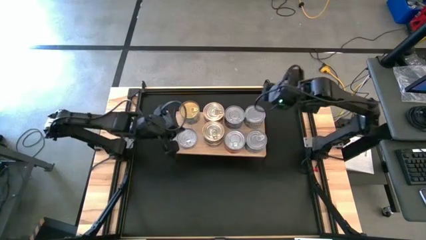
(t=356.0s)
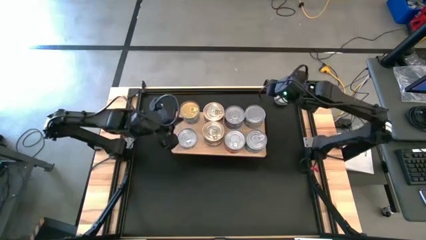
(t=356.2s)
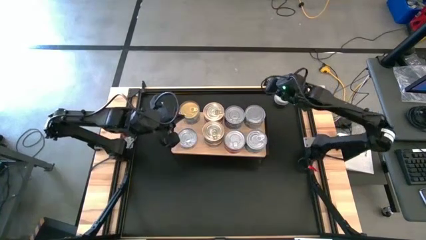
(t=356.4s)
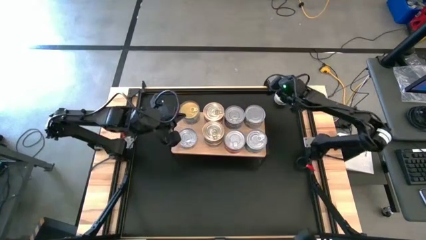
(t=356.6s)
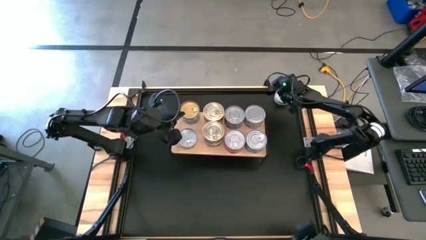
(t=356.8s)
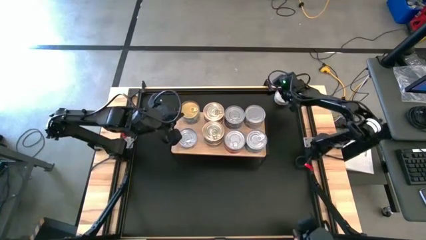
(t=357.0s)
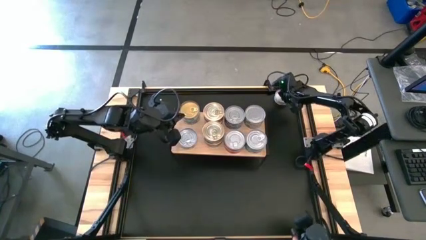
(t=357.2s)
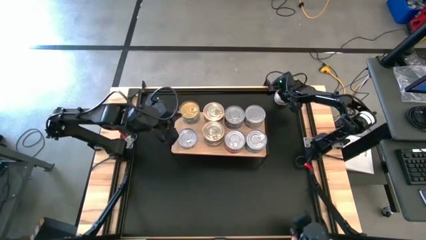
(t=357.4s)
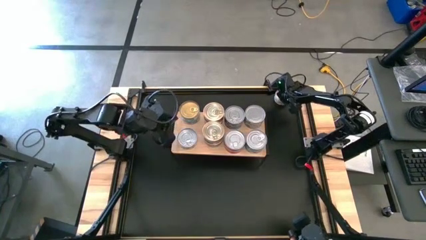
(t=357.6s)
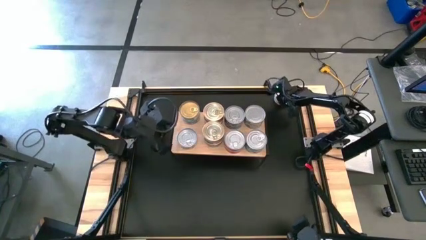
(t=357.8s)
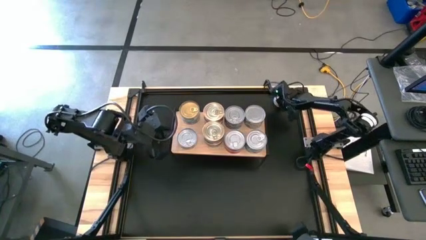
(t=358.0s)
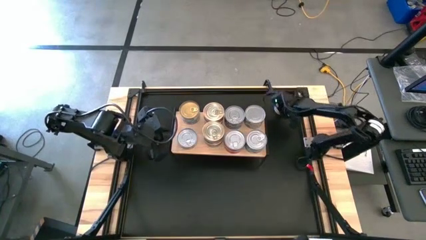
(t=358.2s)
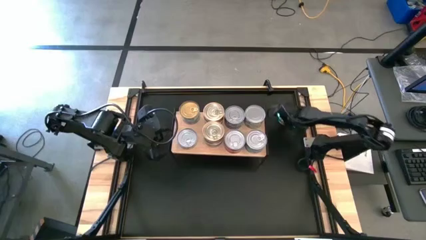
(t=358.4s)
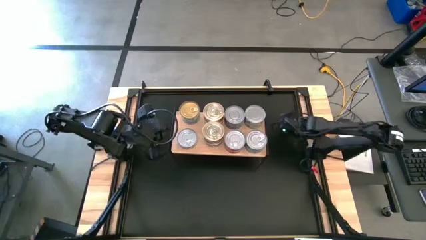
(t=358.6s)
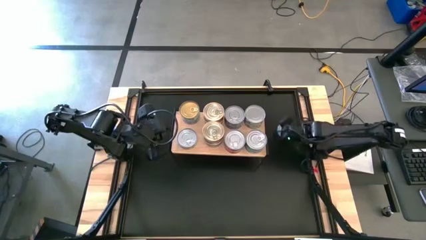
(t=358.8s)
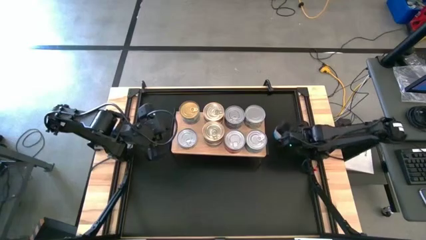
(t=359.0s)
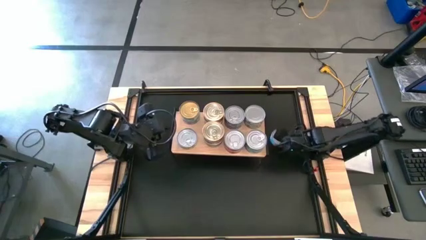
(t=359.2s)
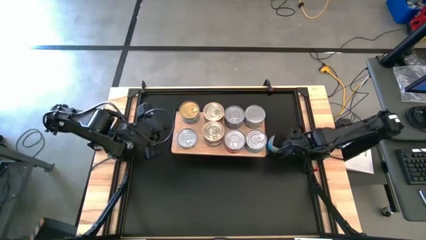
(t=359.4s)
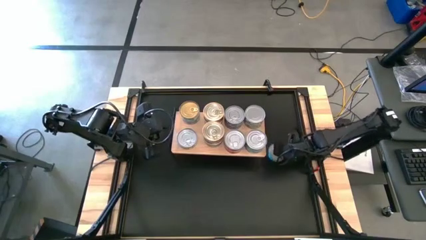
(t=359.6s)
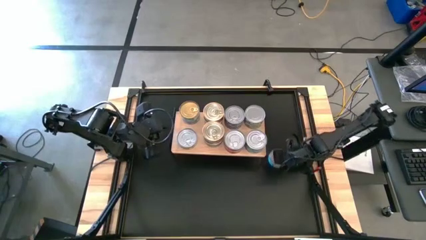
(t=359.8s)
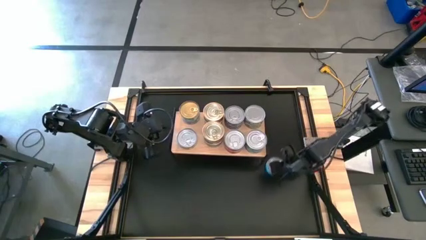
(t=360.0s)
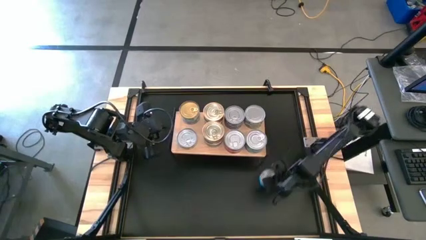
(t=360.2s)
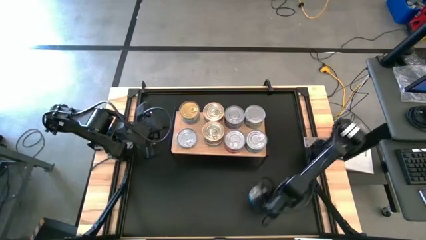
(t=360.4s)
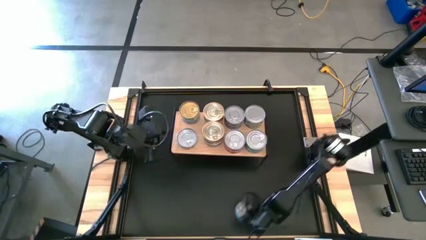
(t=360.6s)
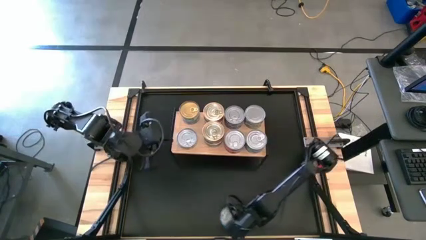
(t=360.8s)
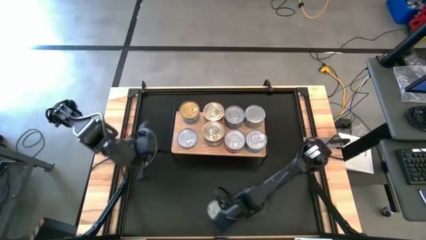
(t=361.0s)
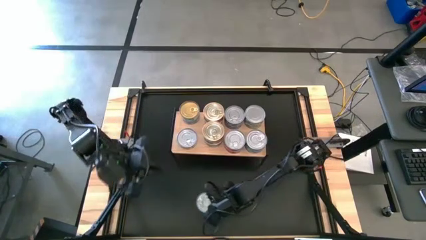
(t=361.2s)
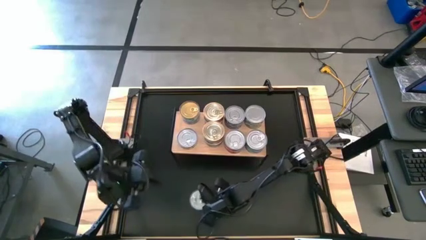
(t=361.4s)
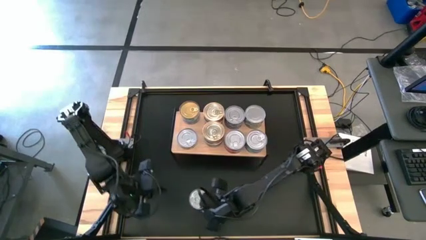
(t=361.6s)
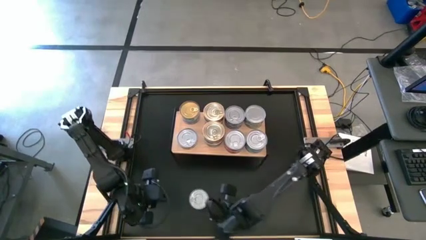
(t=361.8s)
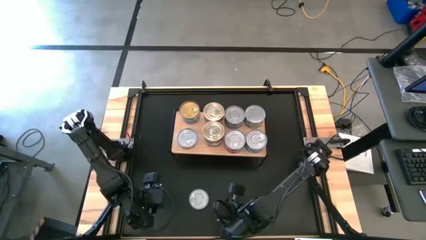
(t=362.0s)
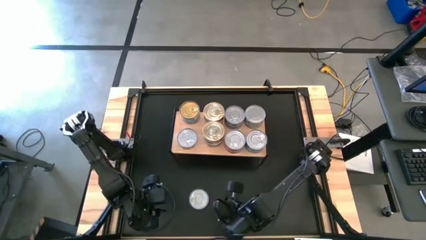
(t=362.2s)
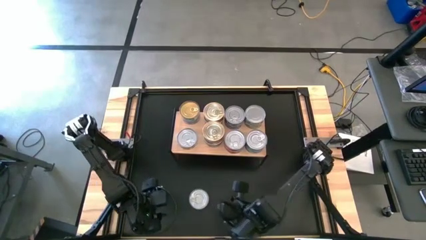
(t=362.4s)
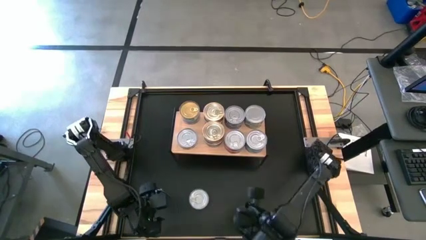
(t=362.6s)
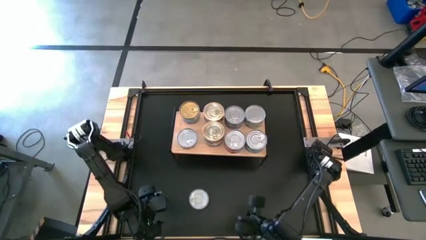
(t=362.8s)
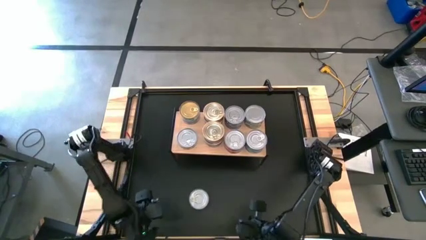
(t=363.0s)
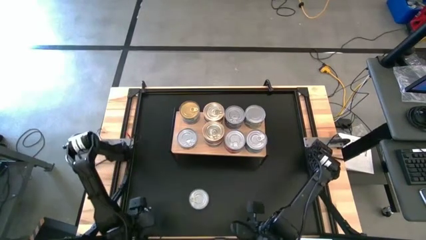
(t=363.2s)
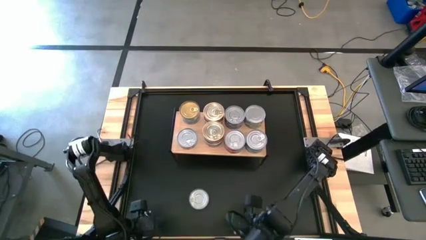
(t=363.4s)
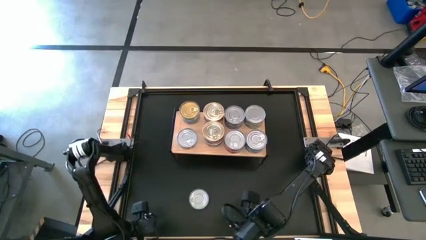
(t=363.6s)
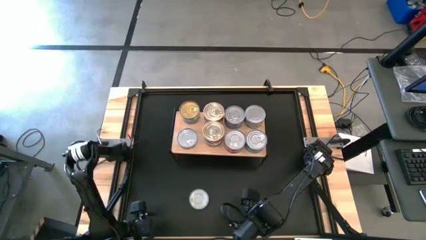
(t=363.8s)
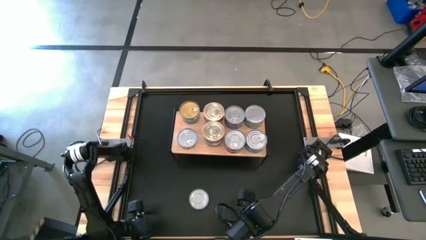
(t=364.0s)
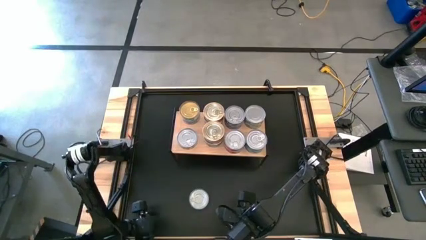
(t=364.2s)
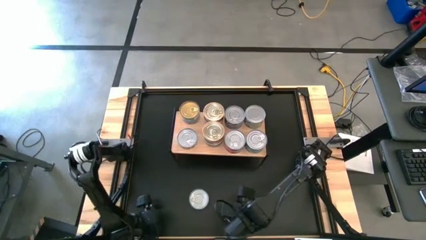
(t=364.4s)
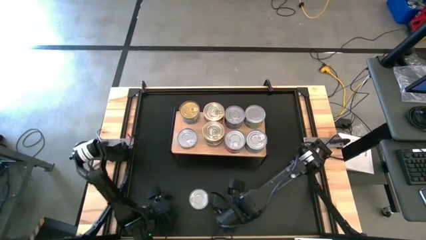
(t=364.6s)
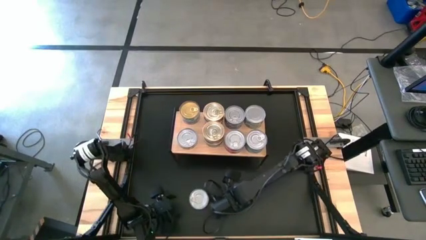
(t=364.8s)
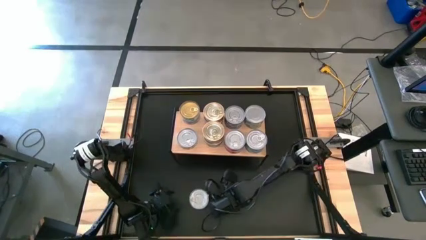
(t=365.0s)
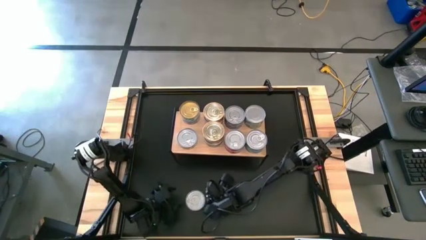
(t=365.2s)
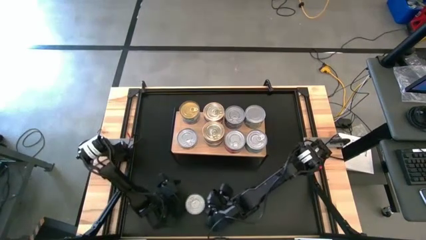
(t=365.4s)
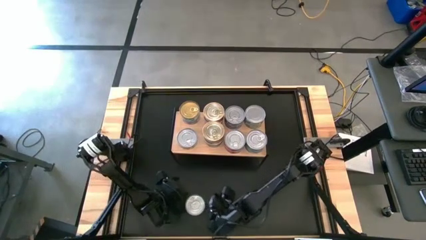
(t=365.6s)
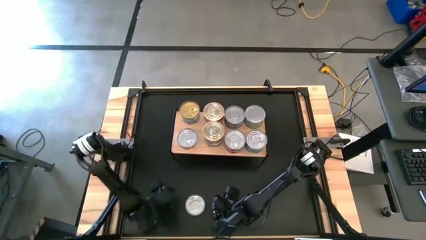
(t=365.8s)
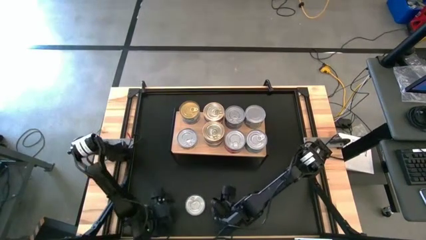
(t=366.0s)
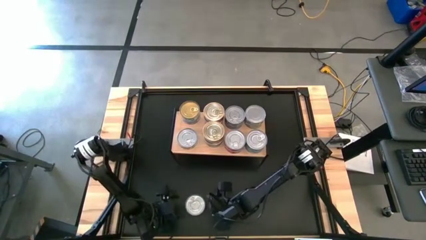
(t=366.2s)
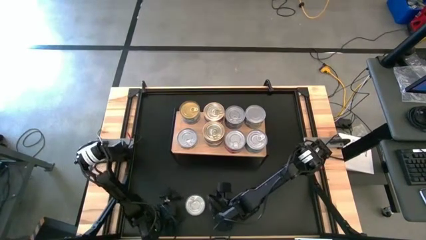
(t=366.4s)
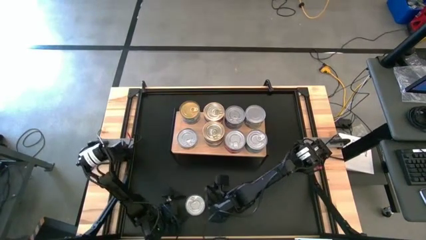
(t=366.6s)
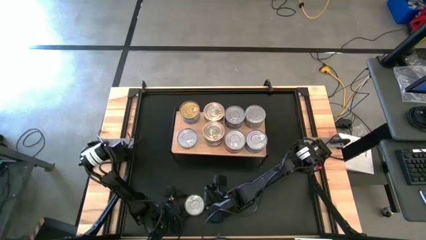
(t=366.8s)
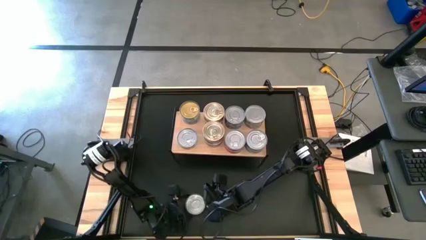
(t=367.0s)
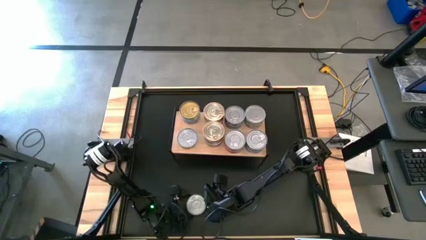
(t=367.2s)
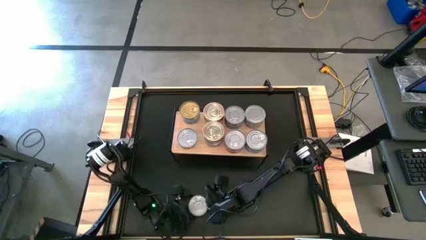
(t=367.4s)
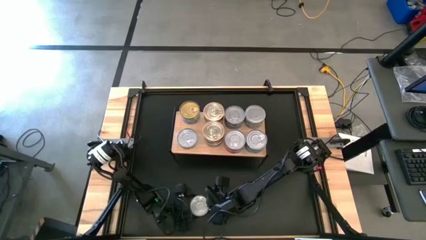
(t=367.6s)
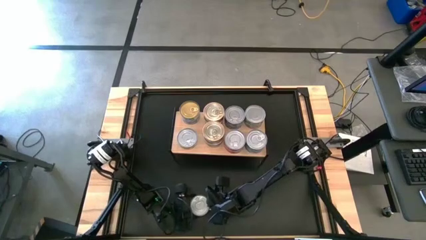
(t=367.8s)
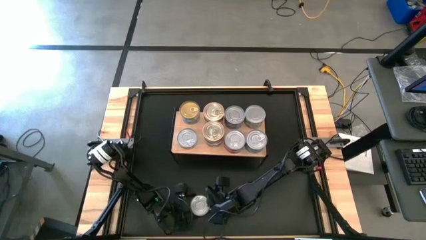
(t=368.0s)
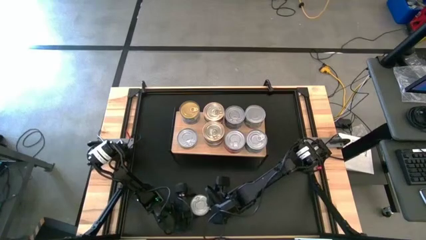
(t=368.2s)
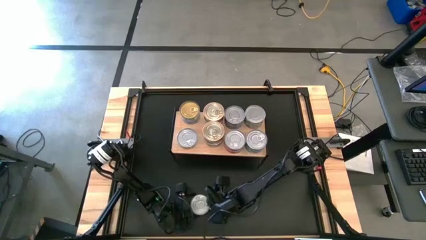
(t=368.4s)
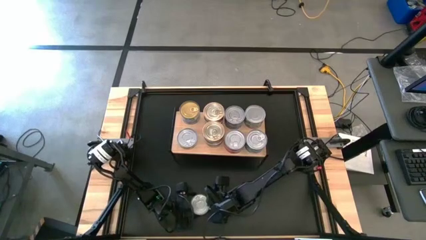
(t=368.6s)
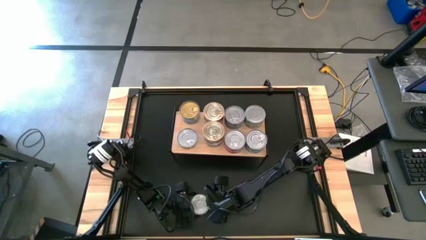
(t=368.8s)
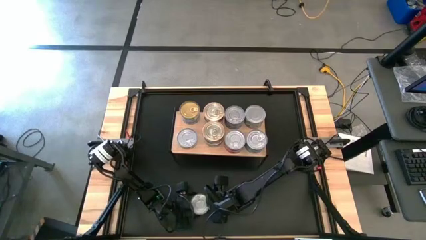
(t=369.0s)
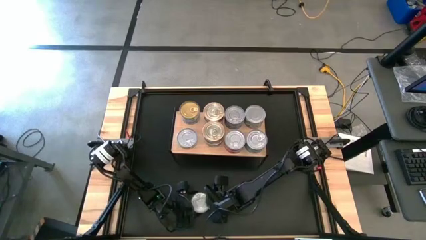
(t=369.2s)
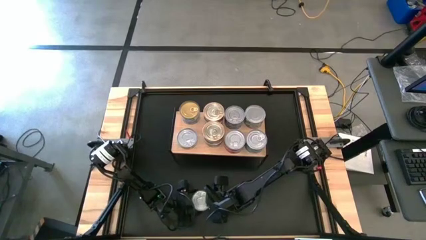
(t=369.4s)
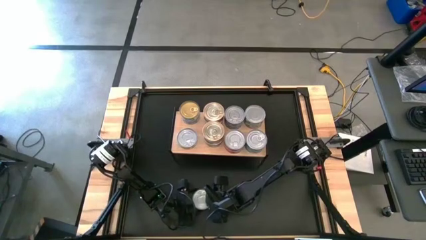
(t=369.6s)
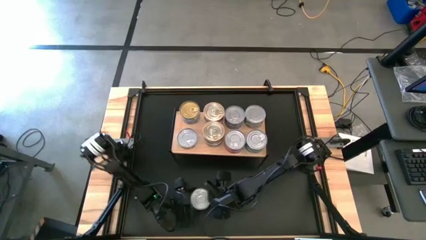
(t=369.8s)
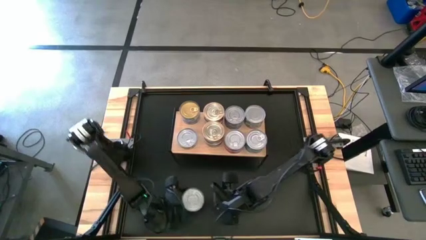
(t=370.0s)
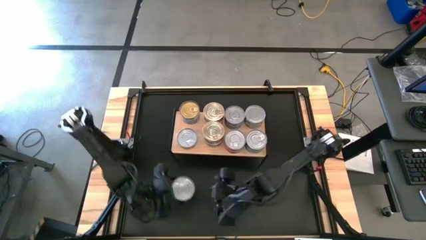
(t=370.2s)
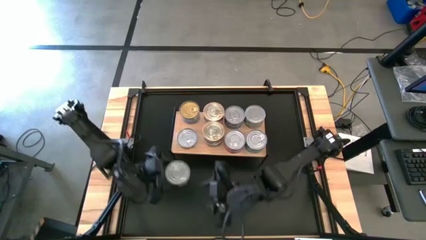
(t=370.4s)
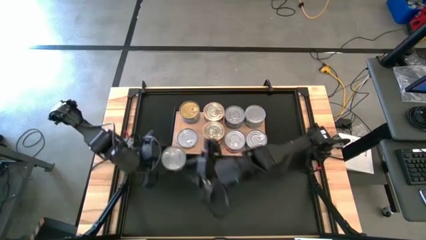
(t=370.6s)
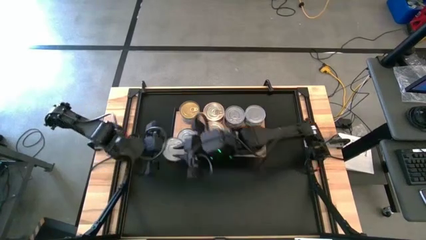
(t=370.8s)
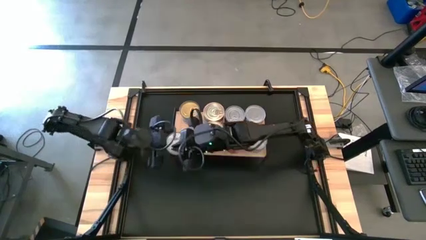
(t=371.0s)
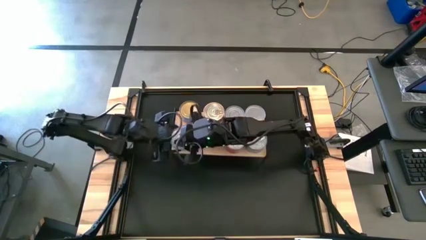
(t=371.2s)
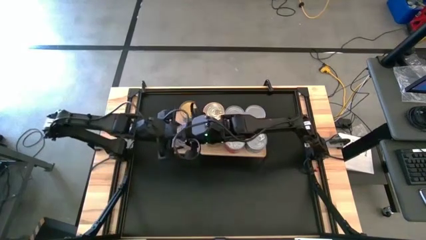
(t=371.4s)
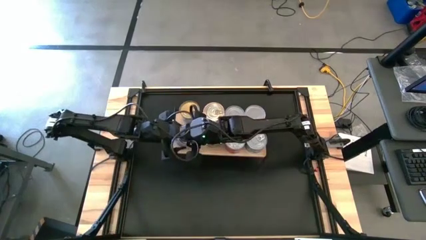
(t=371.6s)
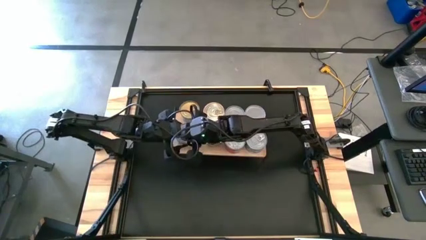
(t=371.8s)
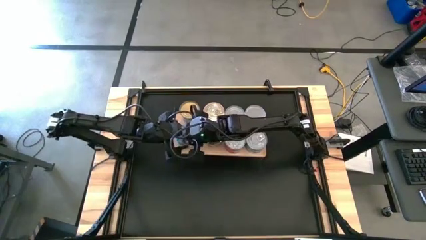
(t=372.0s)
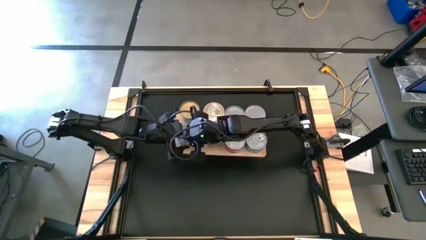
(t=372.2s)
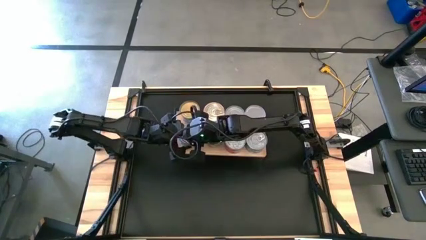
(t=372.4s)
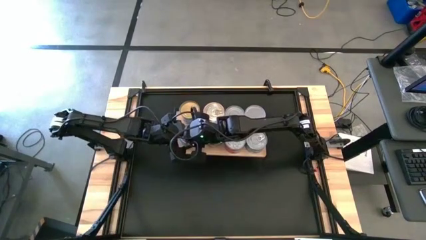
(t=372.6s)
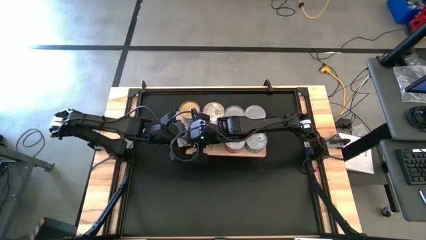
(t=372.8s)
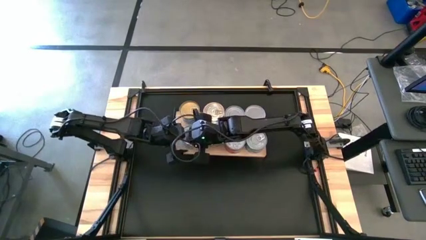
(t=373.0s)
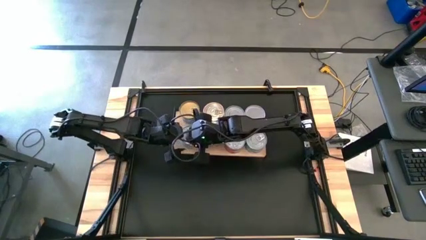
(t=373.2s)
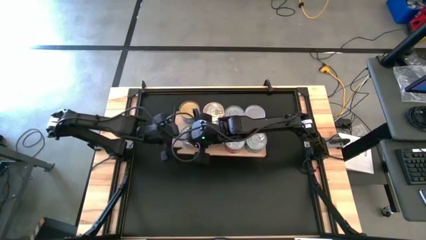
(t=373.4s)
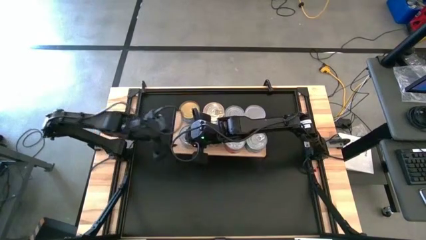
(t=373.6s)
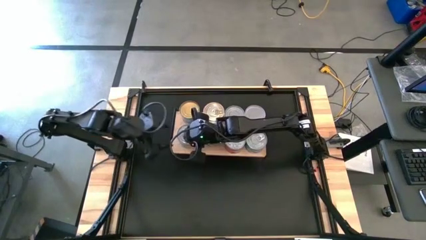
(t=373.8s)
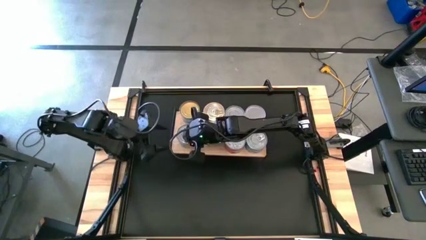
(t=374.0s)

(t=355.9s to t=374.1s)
Task: Stack canned seafood by type on shelf
Stack the yellow blue tuna can on top of the yellow blue tuna can on the shelf
